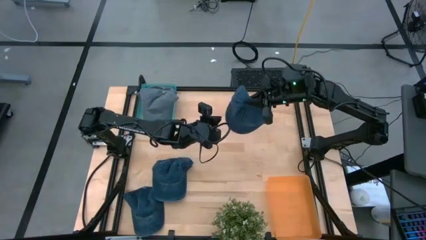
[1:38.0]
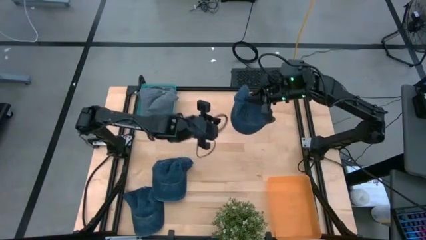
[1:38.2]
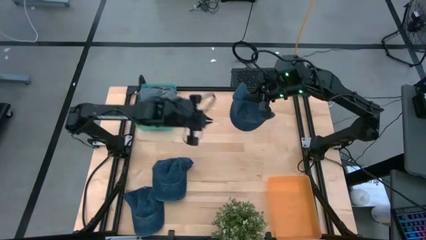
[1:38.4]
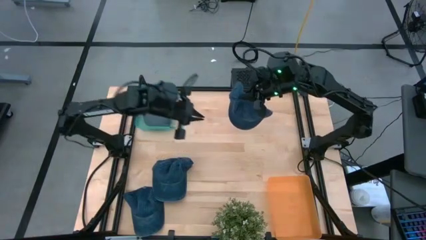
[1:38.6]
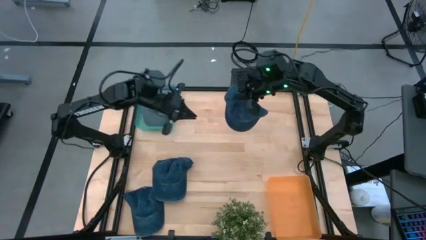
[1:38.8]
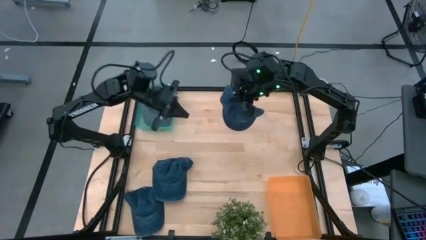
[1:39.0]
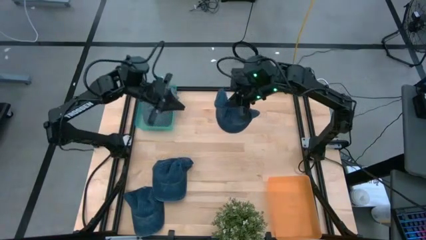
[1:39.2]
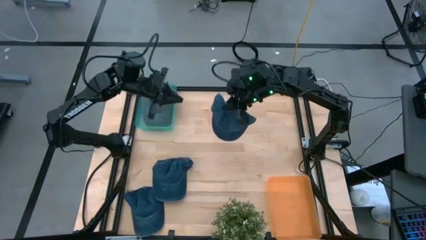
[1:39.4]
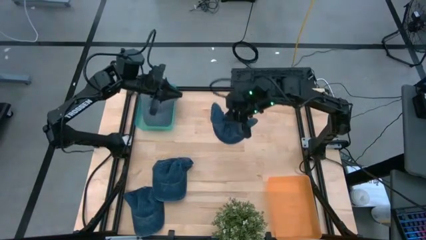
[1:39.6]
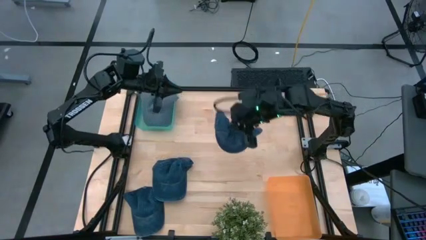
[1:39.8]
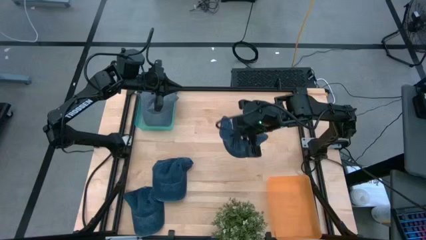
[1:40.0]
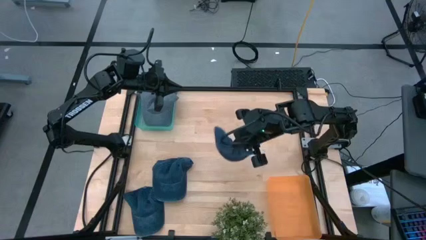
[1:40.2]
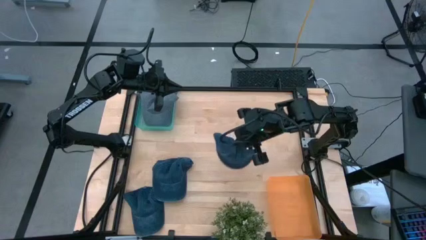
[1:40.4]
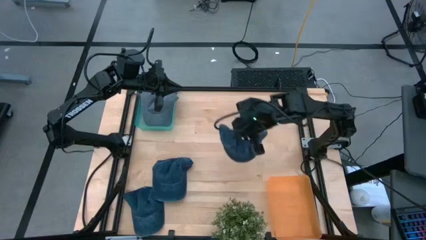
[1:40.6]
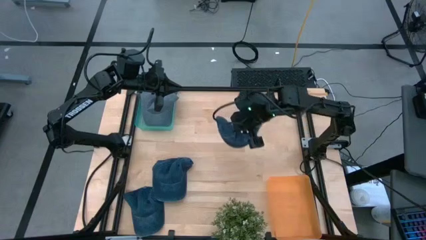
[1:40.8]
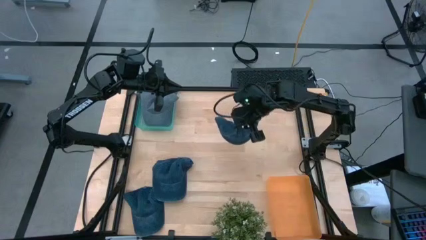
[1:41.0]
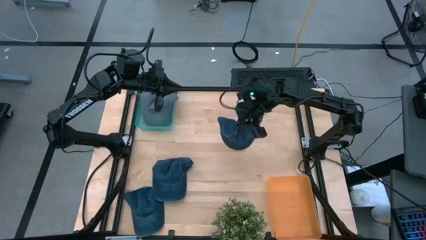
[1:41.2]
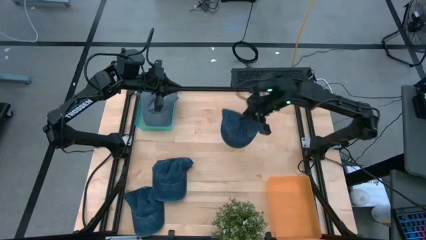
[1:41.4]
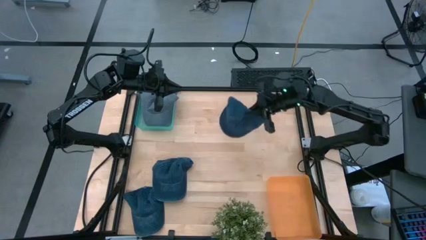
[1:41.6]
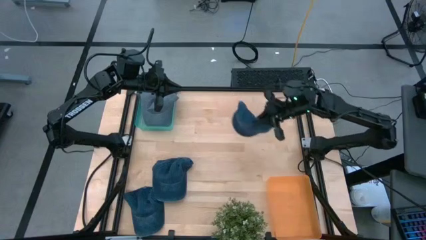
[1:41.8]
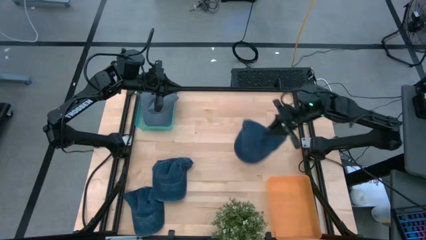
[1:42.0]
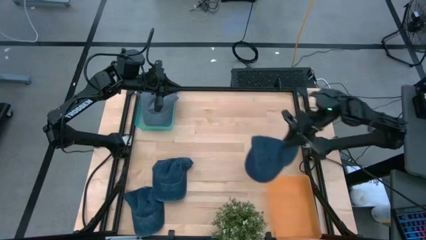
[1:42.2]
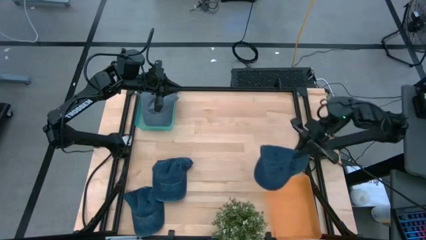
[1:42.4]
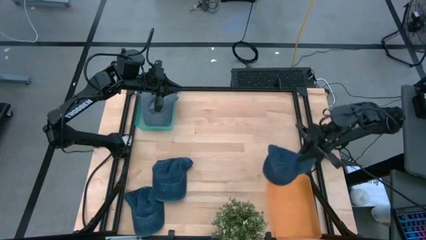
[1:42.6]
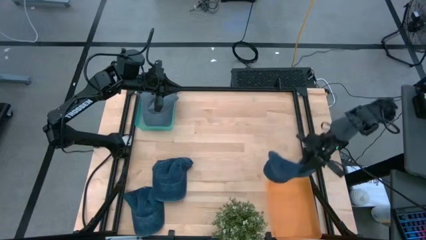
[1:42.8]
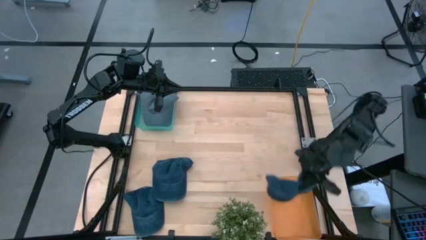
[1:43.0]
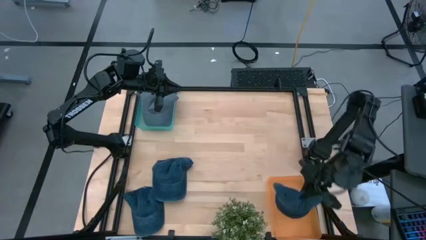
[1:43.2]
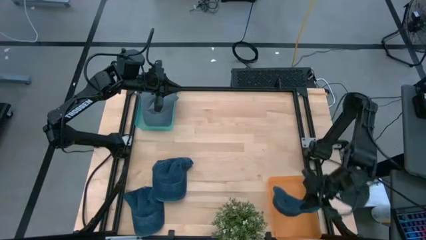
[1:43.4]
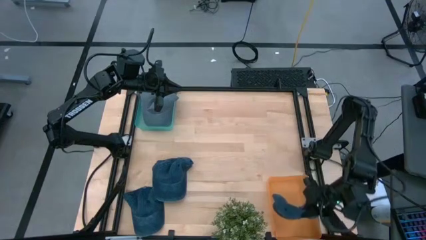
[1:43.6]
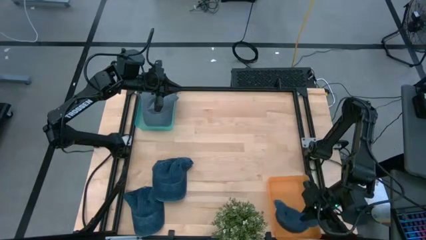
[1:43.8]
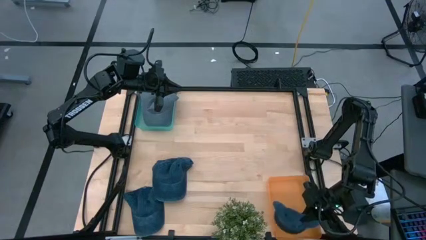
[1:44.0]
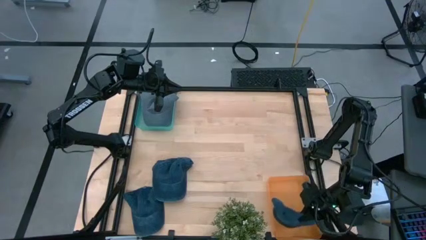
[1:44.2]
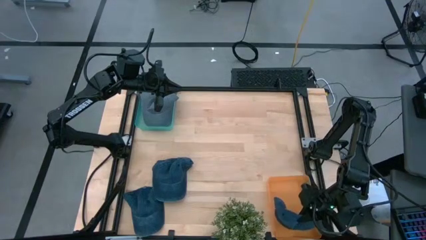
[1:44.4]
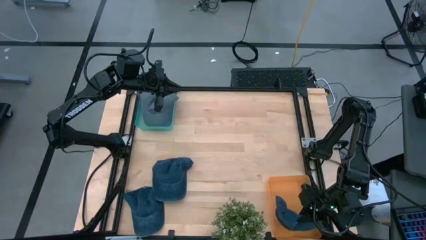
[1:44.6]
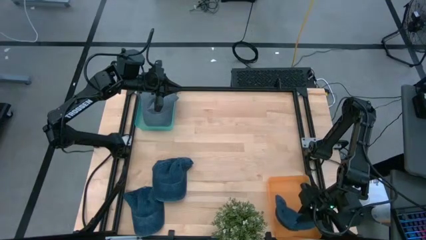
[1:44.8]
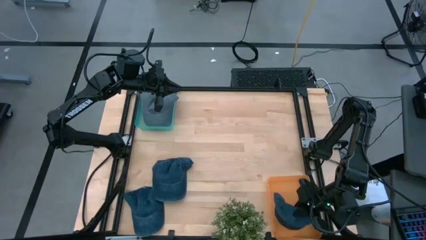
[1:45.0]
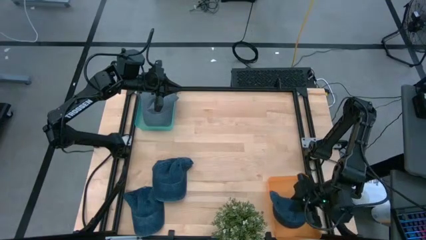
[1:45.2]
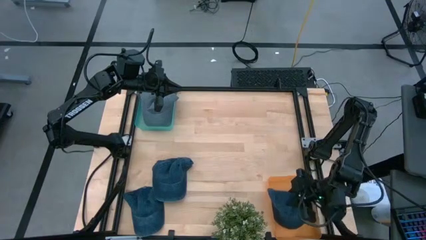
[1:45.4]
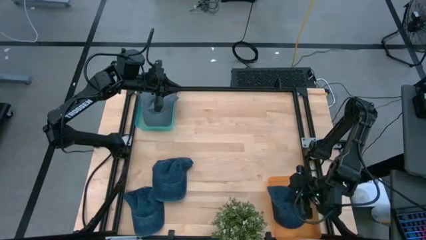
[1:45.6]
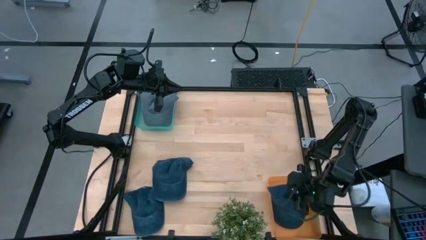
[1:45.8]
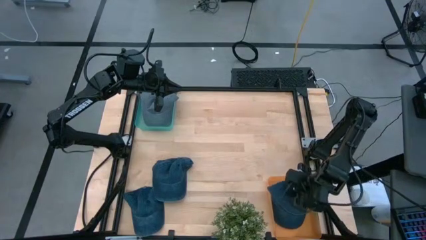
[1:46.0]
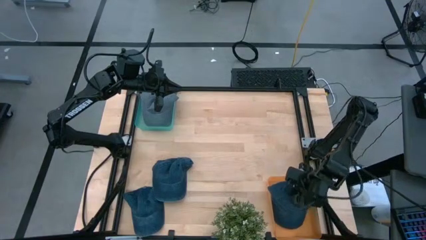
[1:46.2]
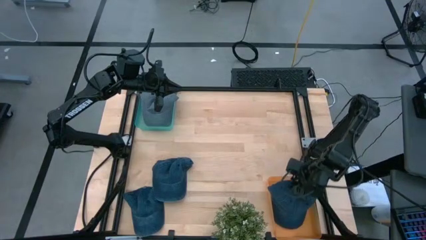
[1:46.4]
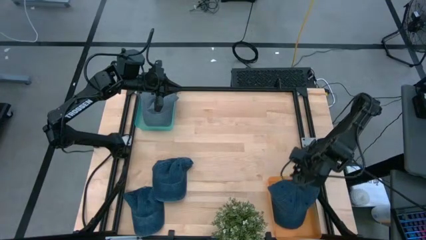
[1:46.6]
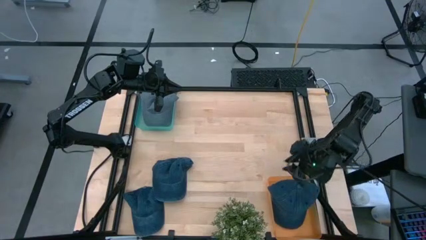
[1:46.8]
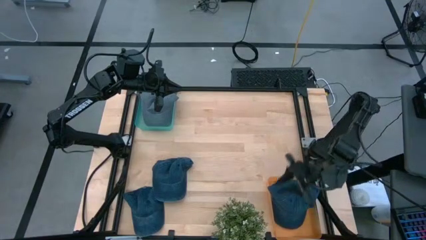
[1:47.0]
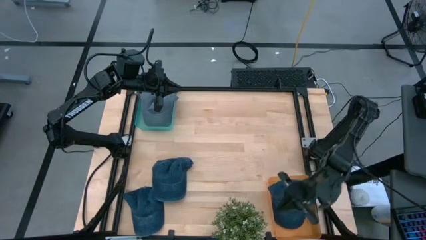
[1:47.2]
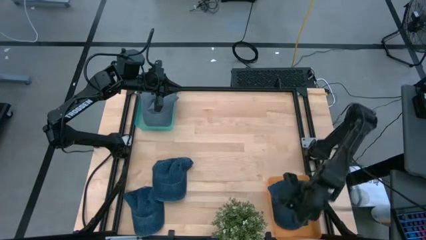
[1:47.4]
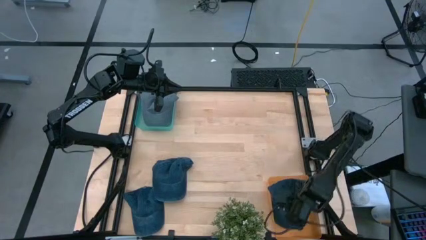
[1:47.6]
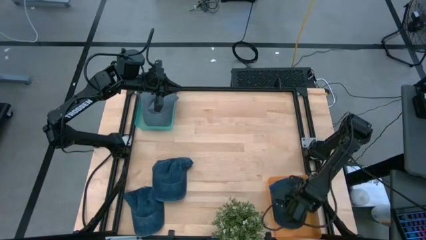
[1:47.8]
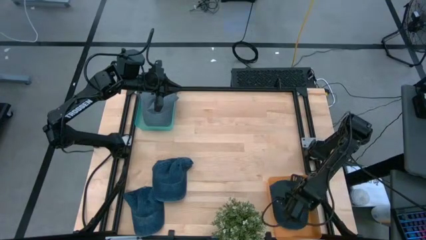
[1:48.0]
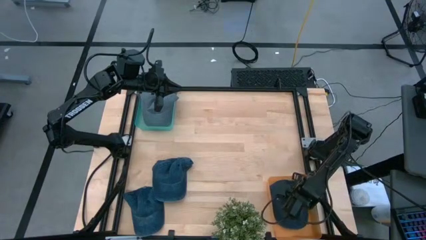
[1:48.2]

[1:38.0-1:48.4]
Task: Pick & Place hat
Put the top blue cap into the orange bin

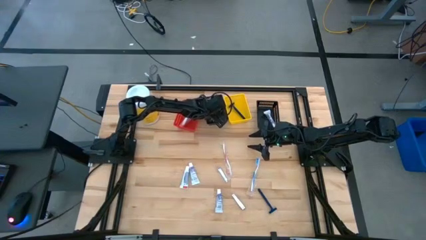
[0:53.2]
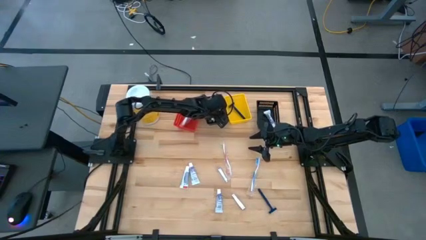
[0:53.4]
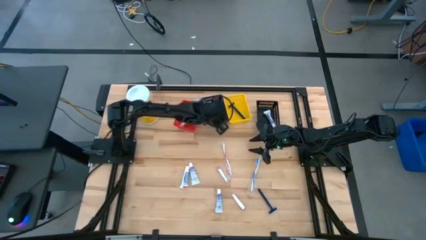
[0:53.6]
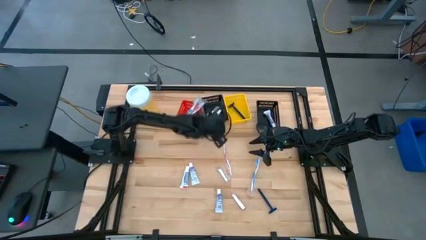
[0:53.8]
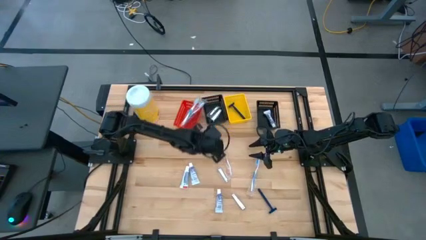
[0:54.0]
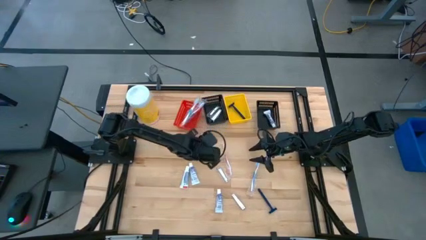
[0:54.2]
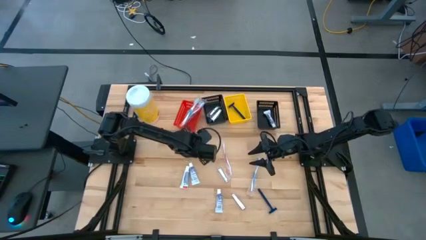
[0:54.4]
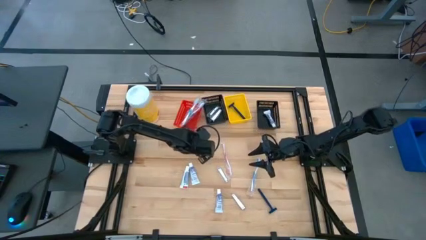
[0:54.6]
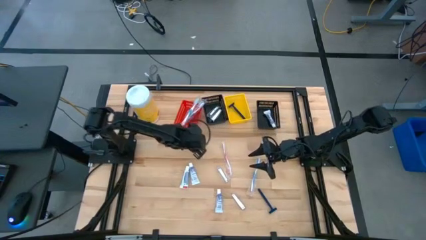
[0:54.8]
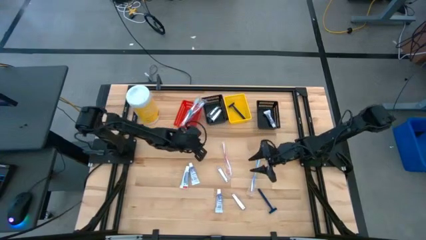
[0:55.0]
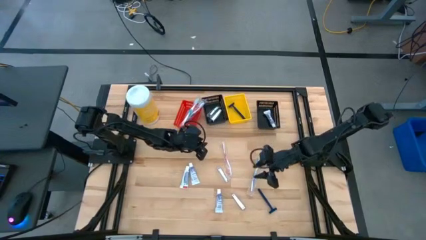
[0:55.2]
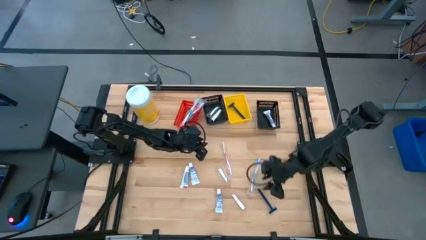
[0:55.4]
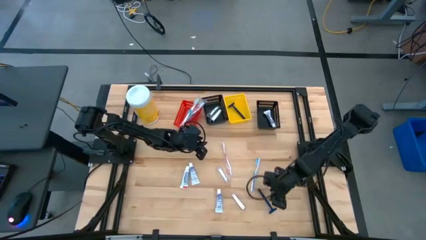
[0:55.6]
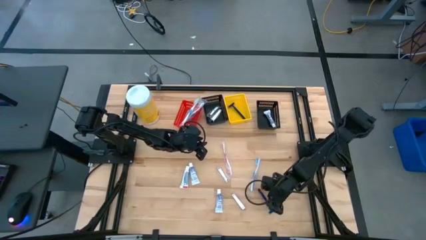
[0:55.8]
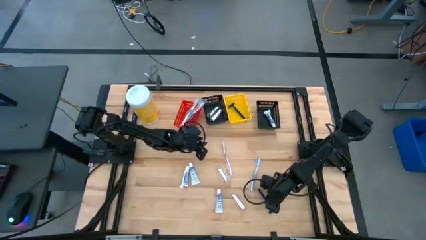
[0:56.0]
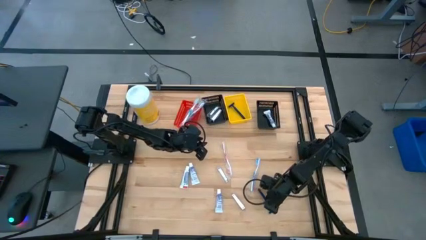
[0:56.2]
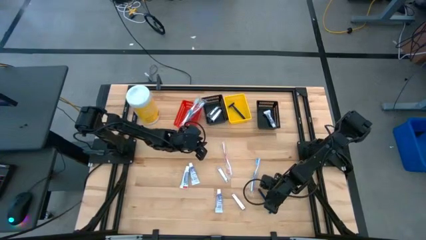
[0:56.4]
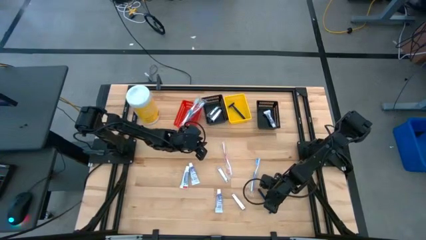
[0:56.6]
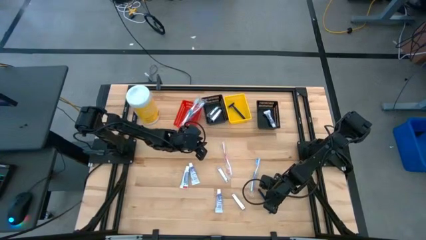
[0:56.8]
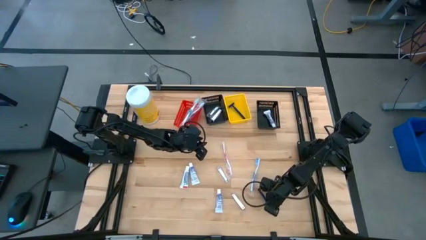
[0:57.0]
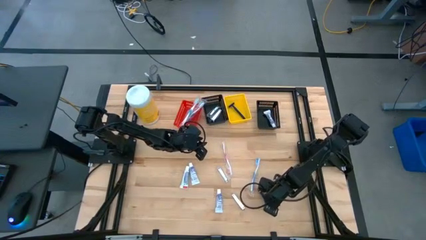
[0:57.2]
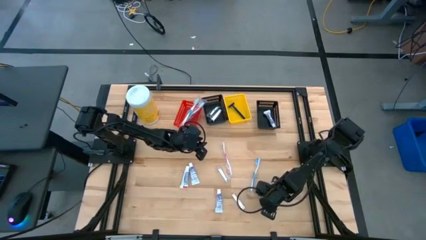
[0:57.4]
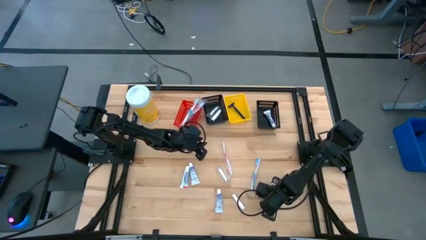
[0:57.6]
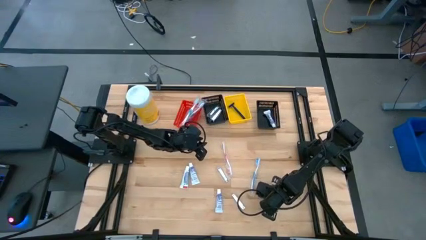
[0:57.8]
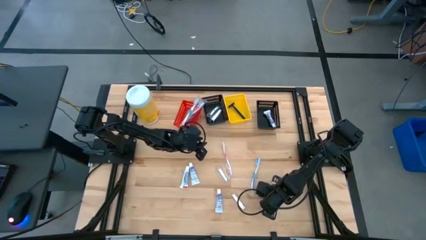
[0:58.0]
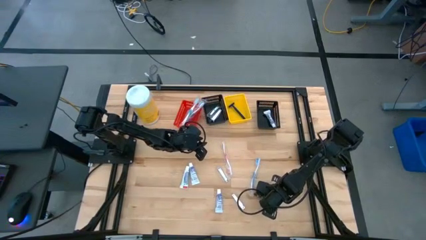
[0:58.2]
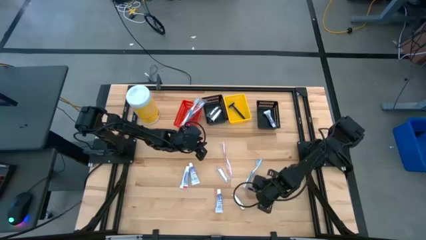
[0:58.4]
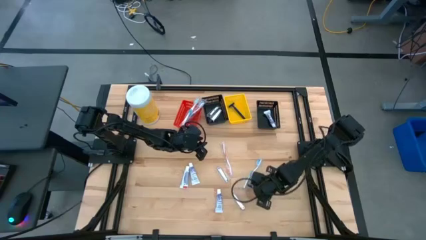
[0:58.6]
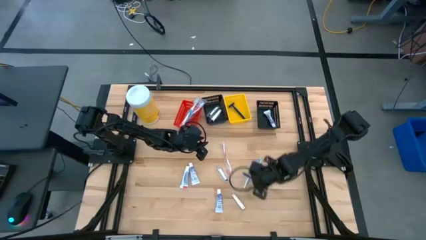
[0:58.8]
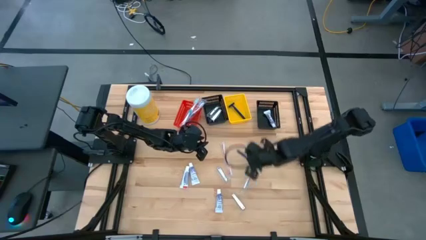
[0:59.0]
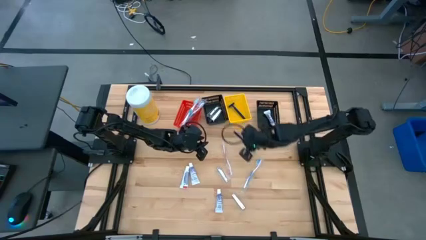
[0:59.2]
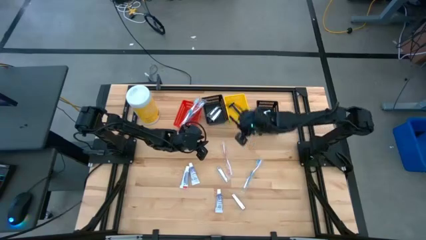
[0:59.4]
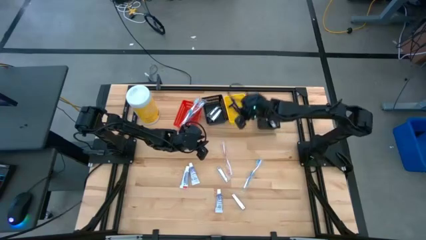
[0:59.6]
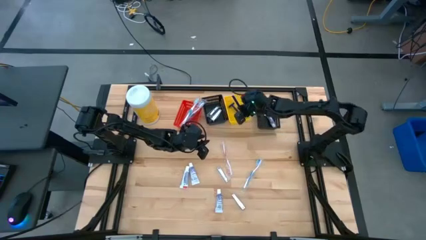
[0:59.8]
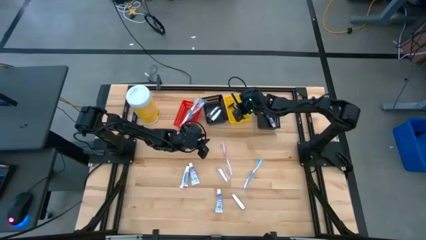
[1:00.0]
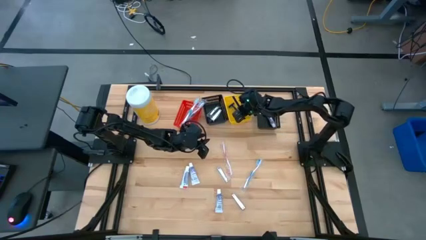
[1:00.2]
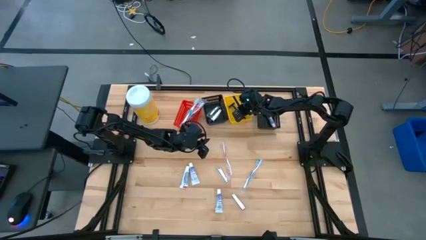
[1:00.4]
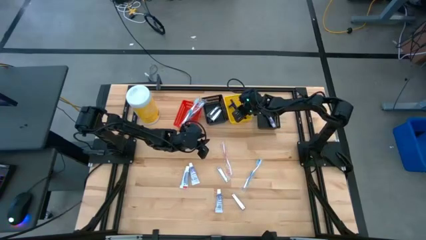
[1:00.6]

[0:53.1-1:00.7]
Task: Pick & Place Travel size toiletries
Put the blue razor into the yellow bin
